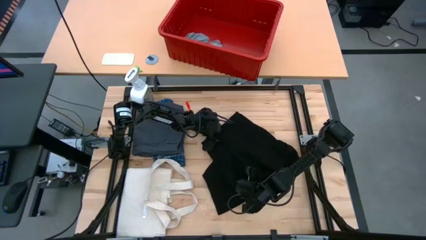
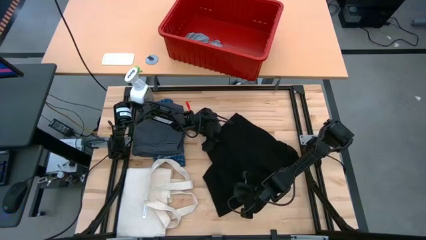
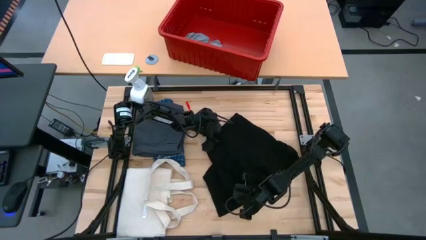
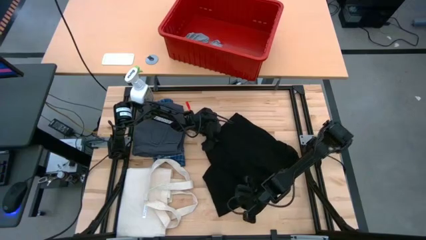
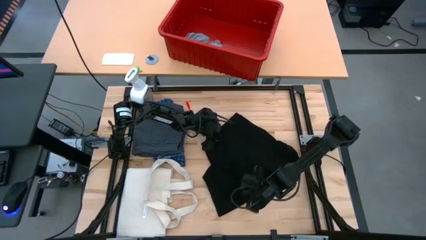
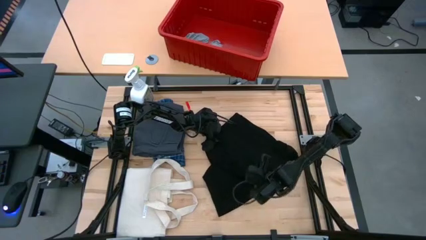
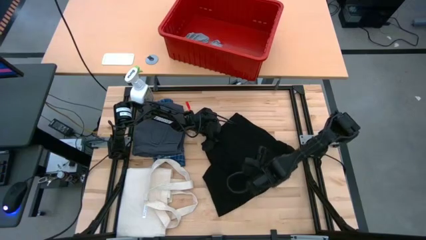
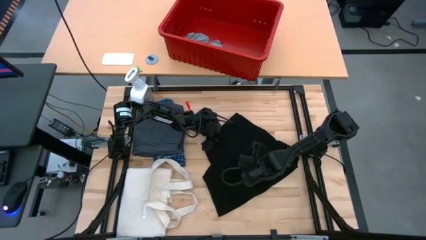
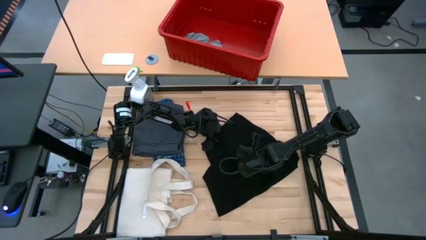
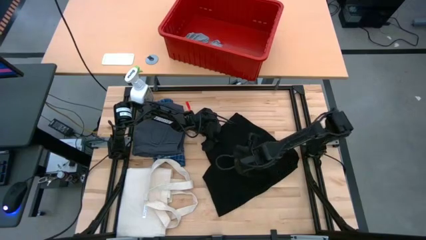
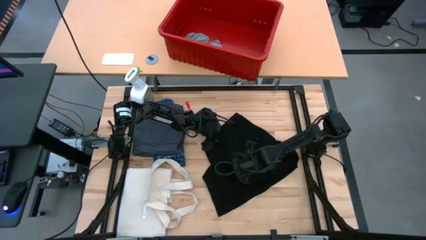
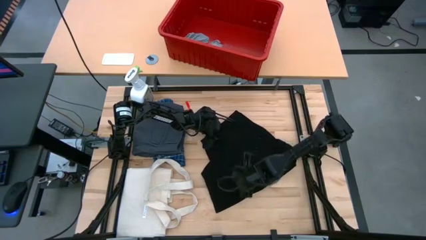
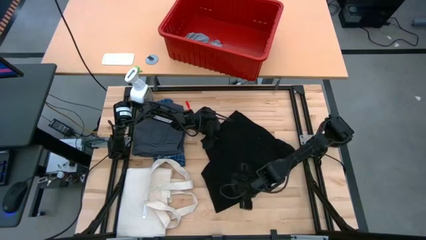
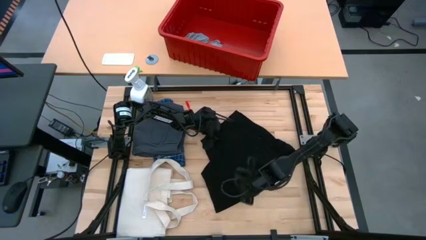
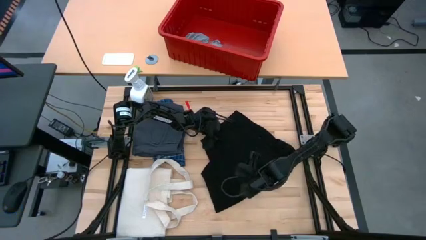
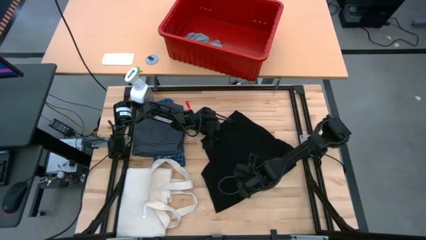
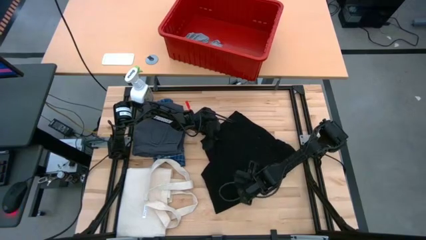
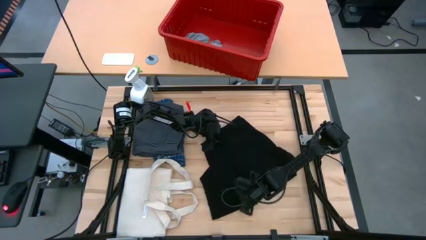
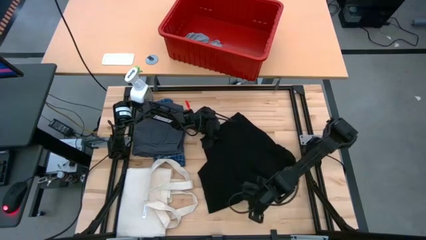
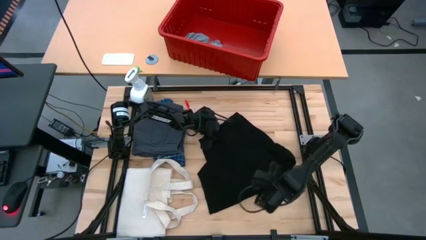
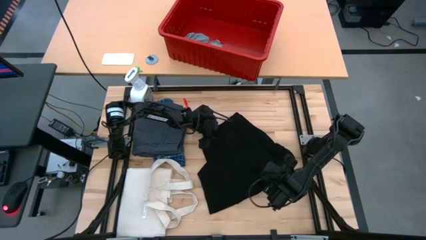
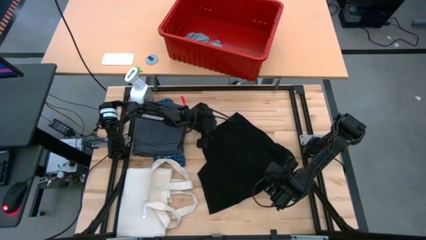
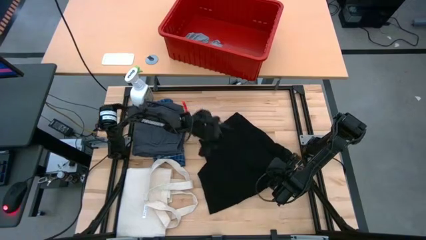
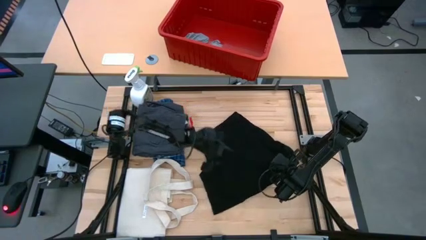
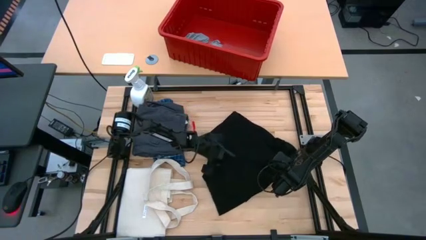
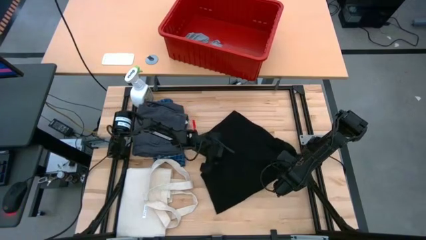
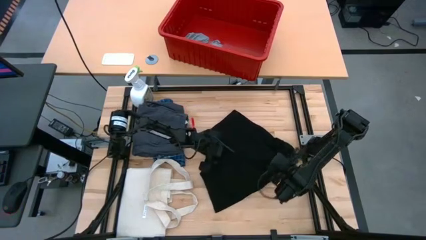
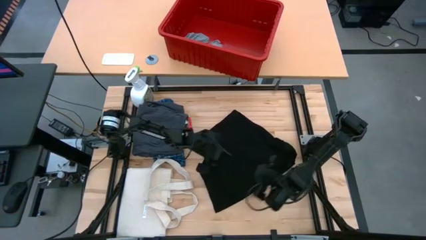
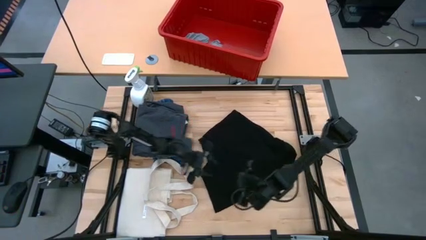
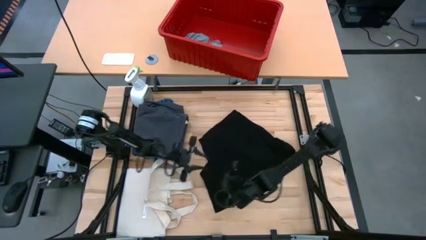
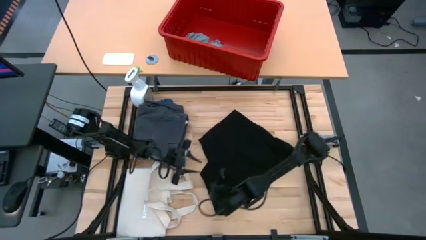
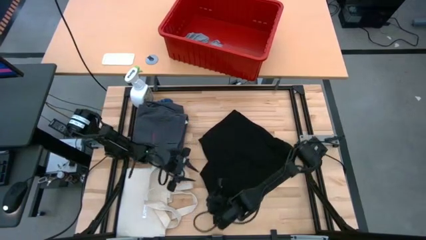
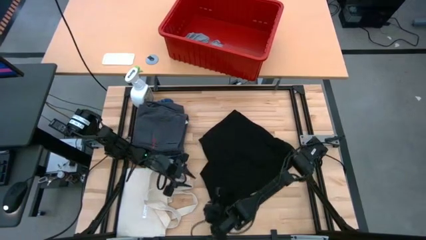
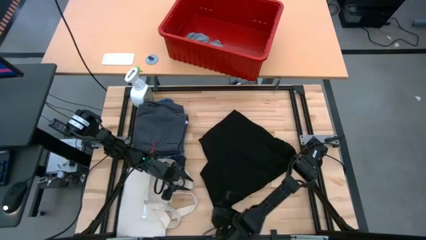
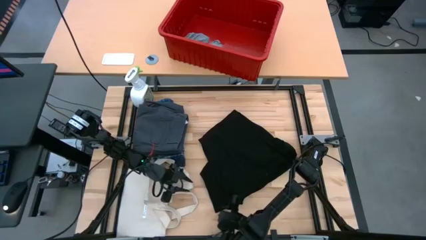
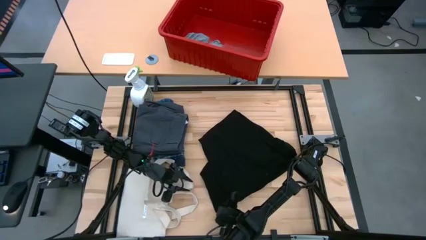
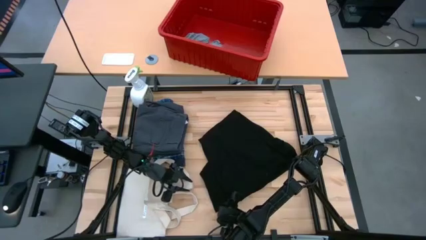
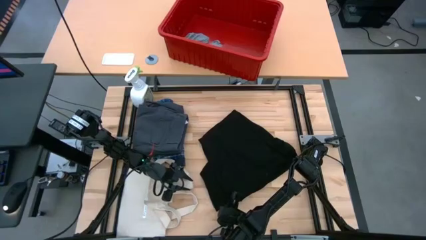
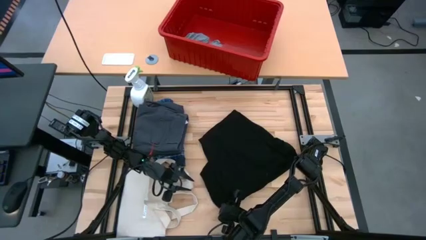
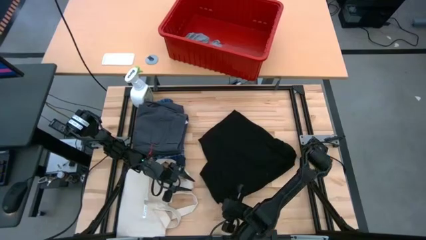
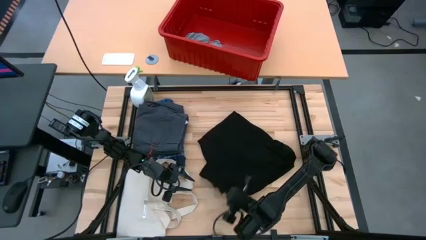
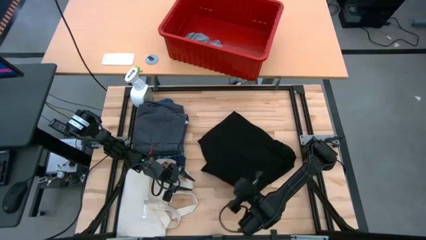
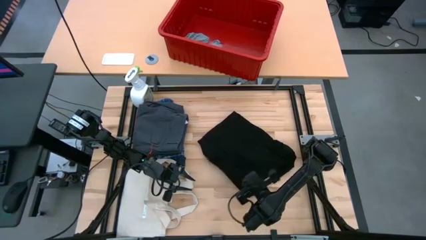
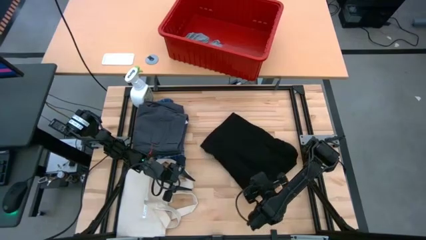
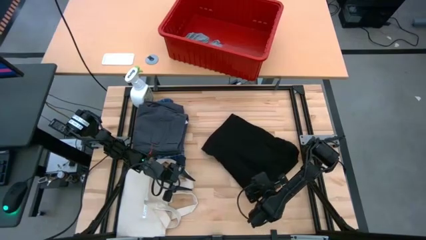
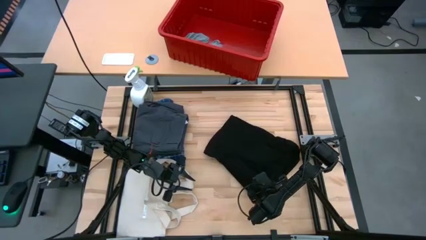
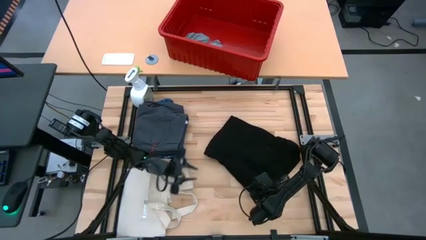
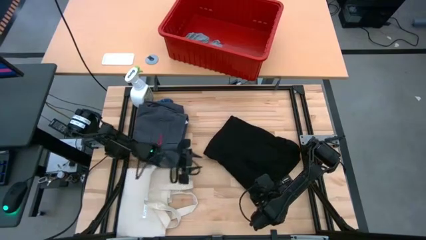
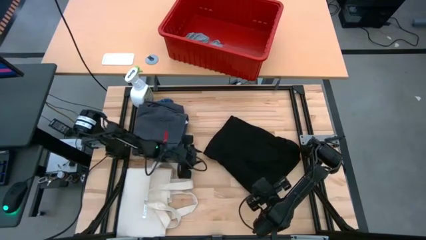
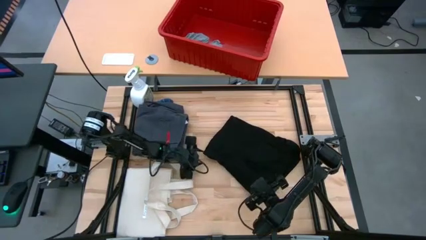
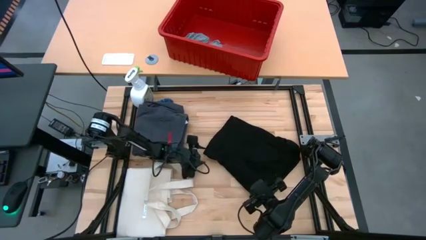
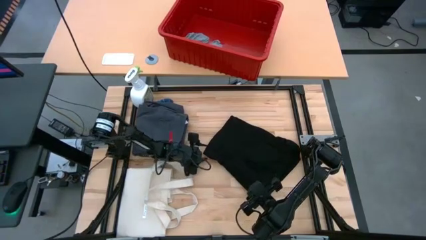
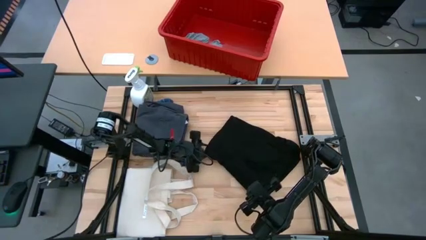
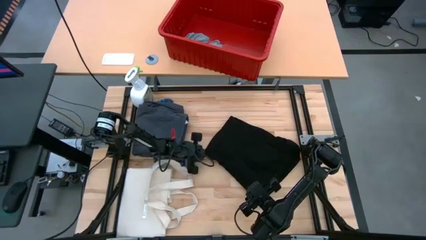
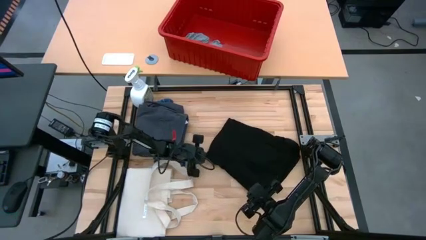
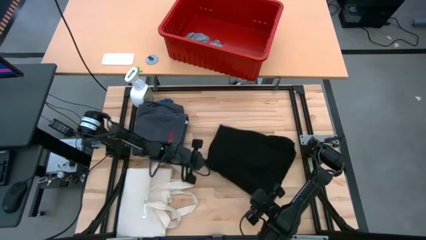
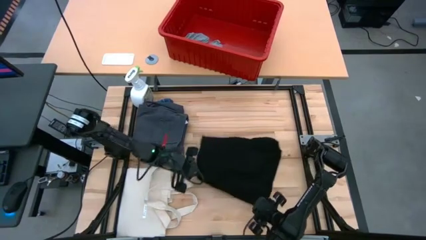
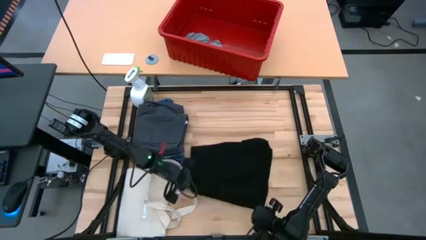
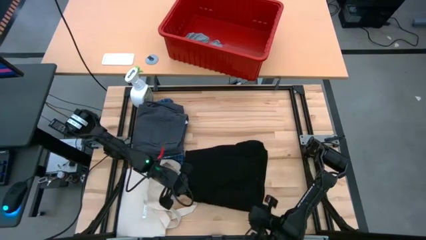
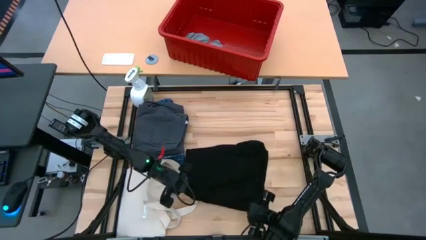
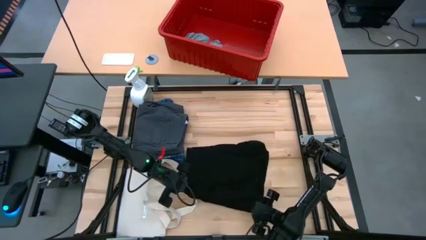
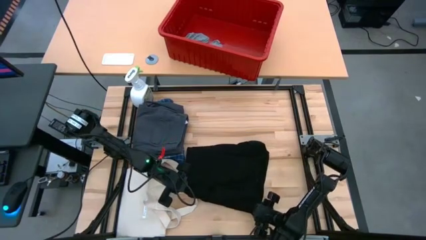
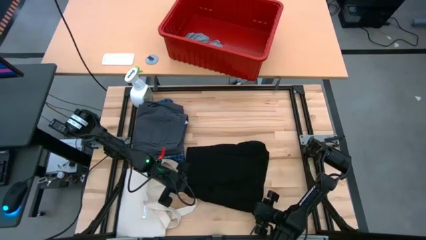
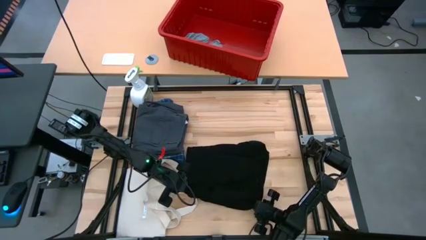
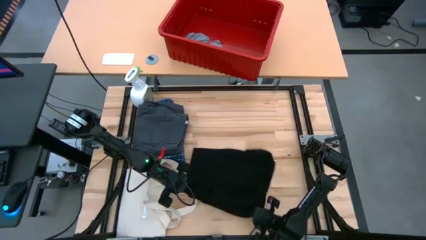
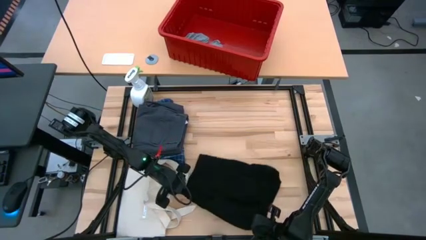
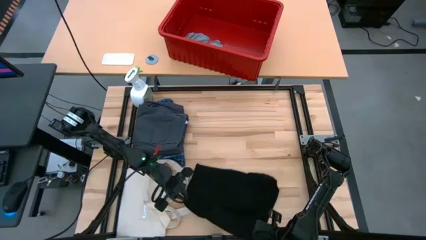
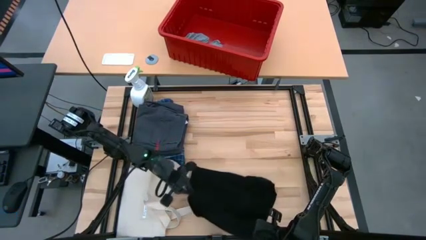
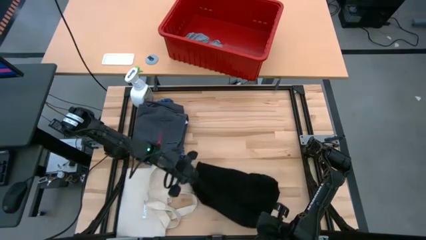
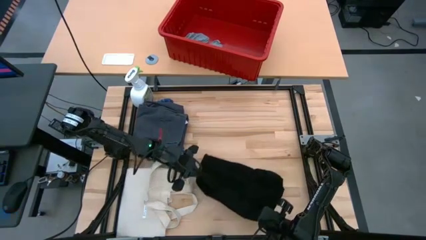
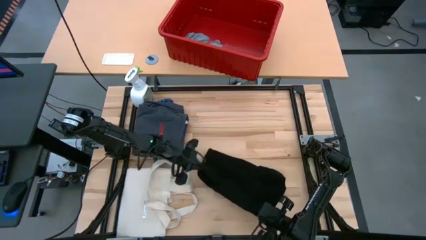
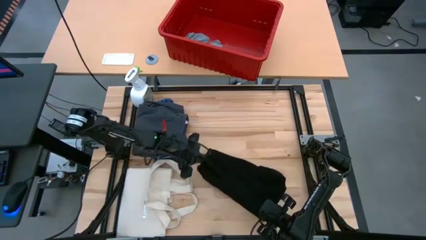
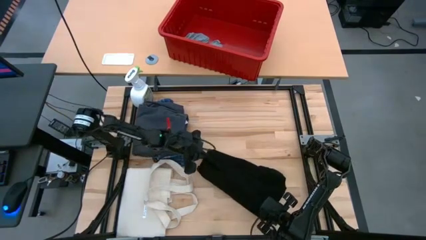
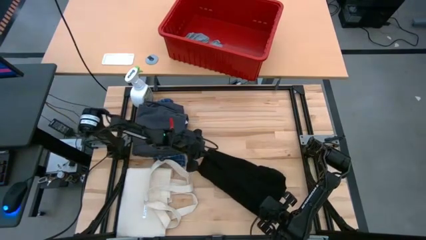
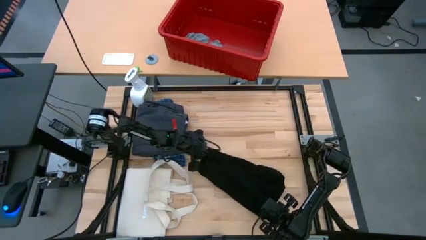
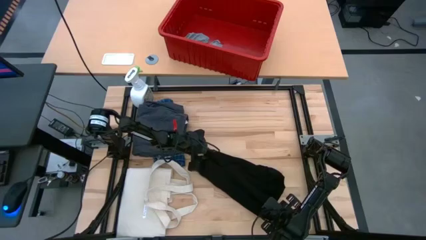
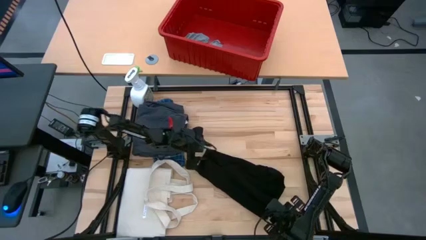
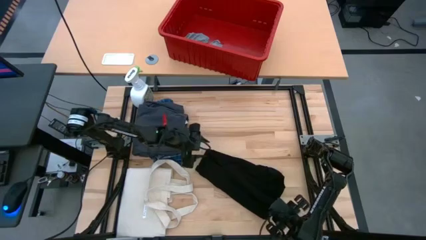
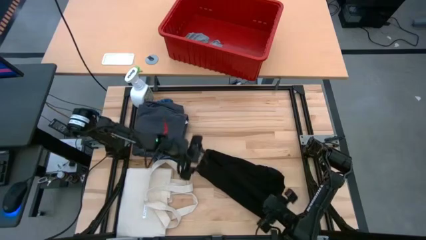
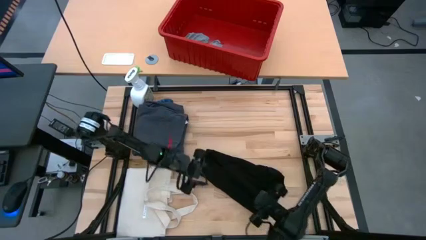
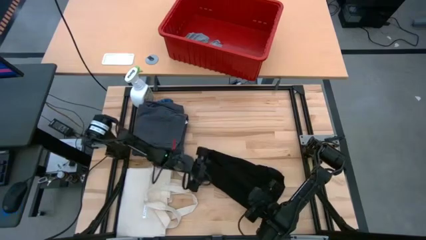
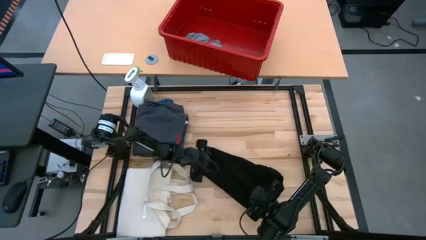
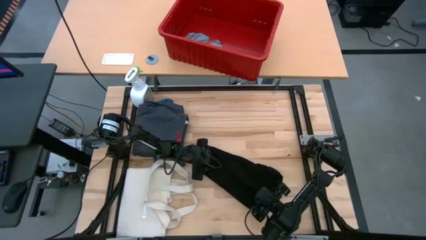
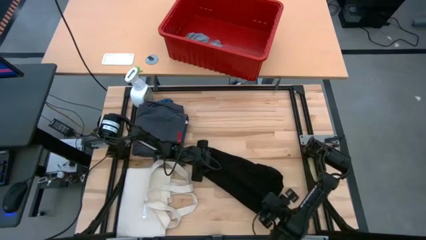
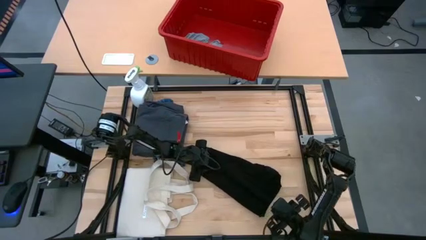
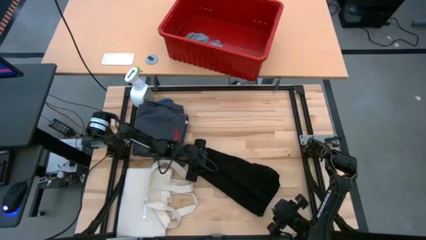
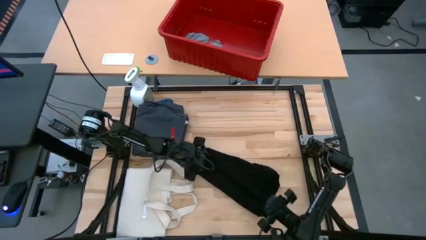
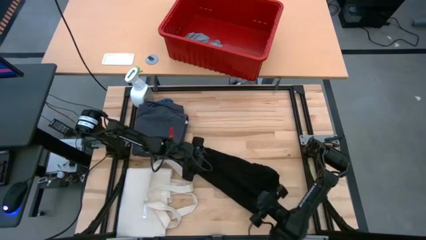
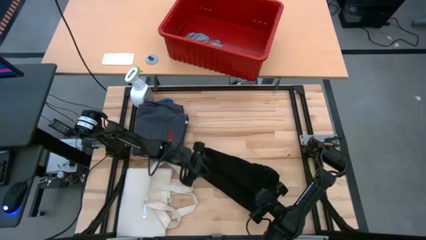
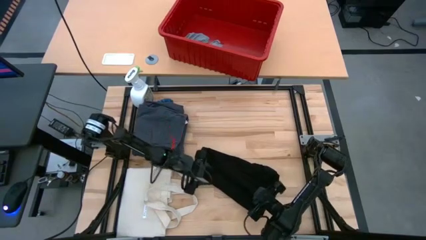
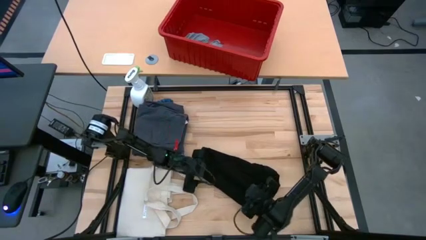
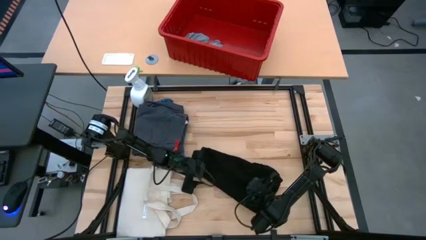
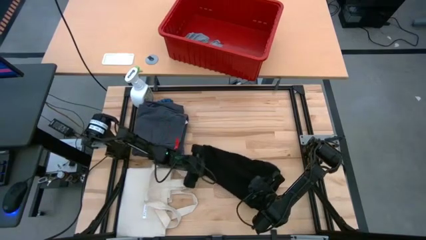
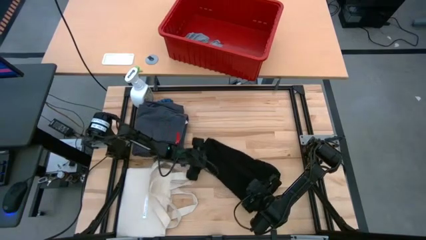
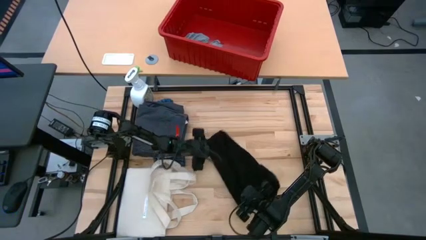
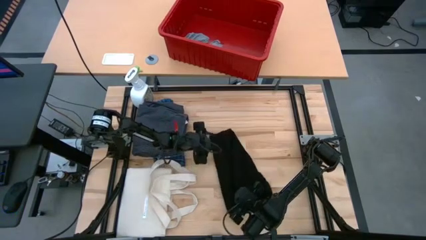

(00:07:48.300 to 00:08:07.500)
Task: Fold Laundry from Bin
Fold the black shirt
